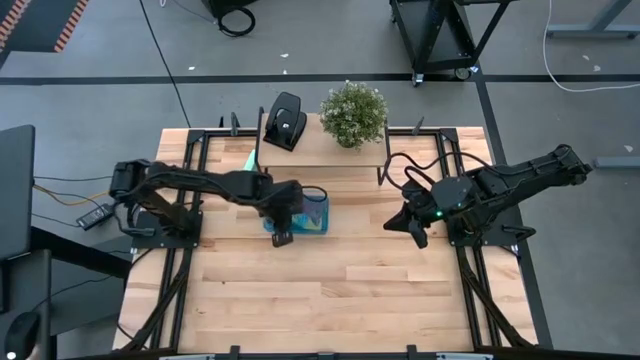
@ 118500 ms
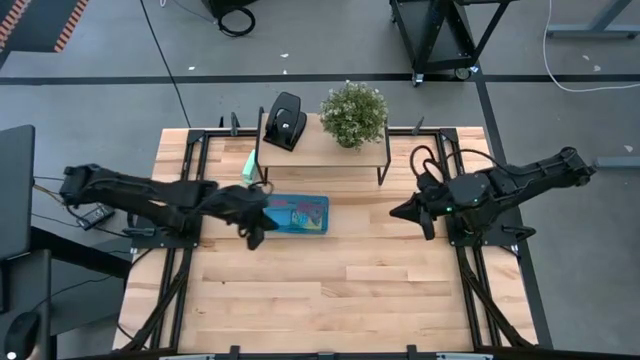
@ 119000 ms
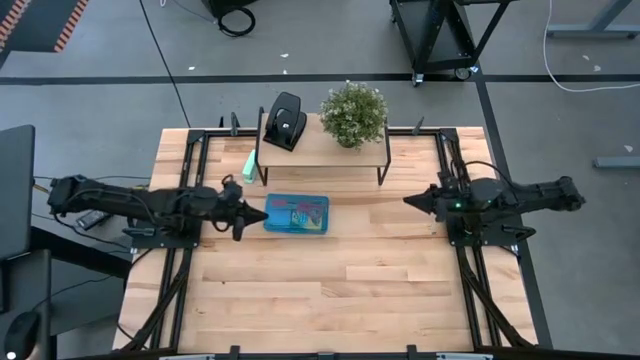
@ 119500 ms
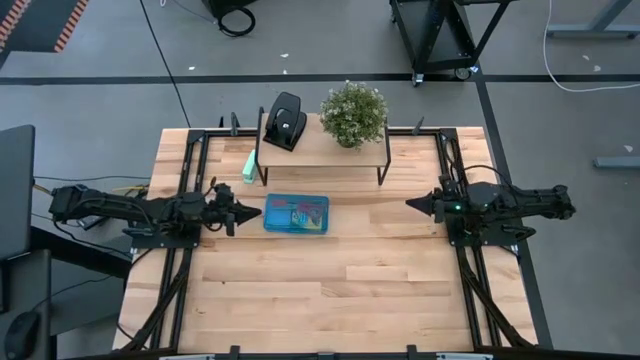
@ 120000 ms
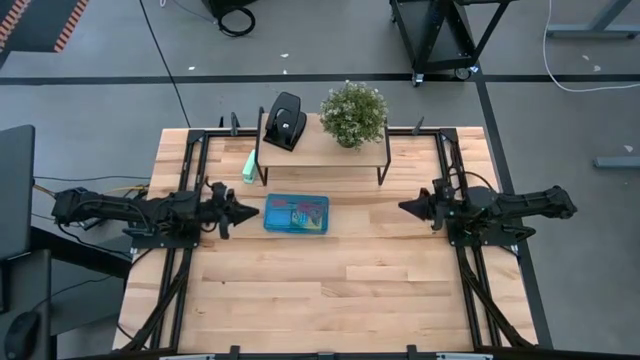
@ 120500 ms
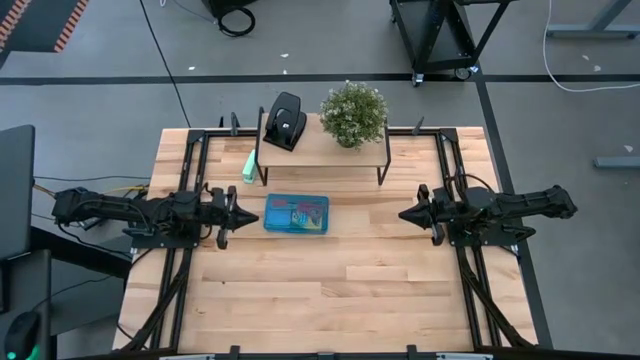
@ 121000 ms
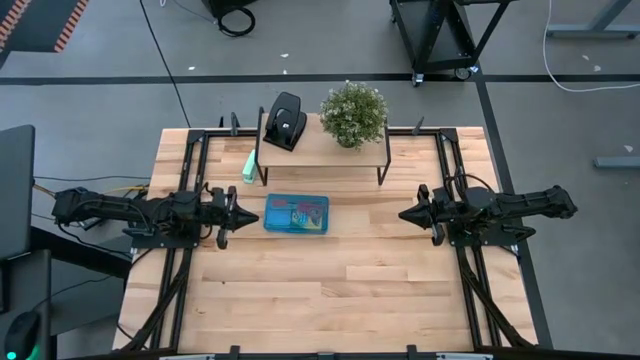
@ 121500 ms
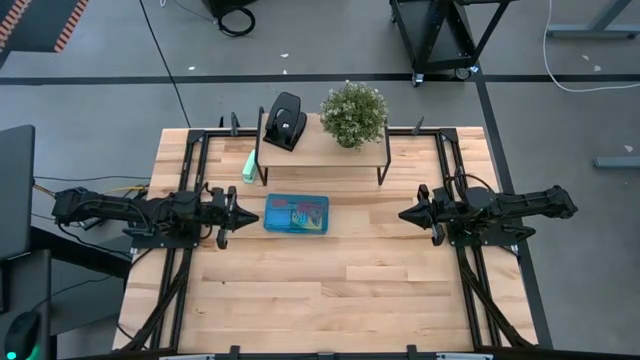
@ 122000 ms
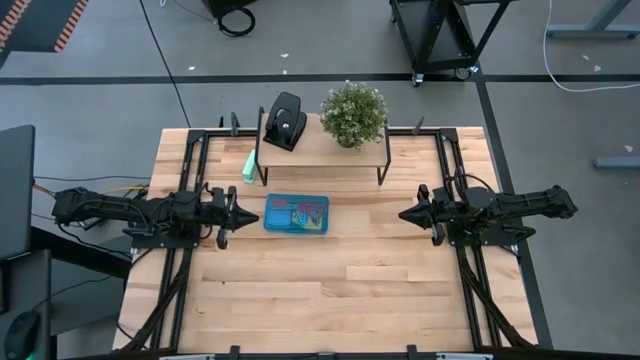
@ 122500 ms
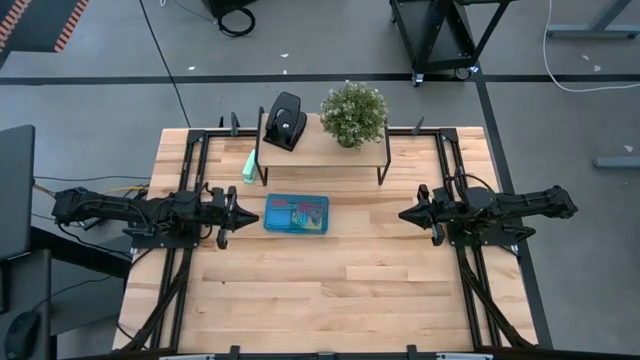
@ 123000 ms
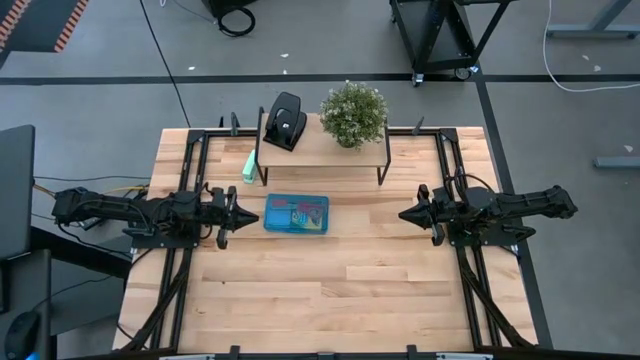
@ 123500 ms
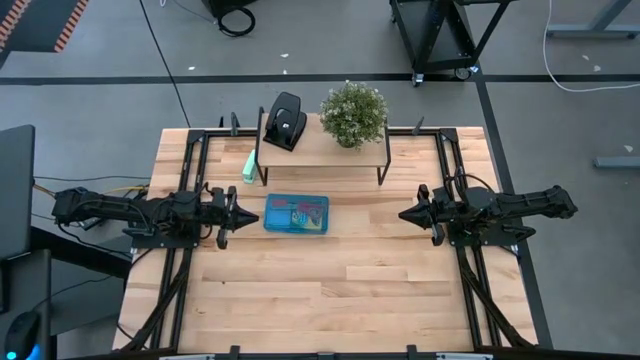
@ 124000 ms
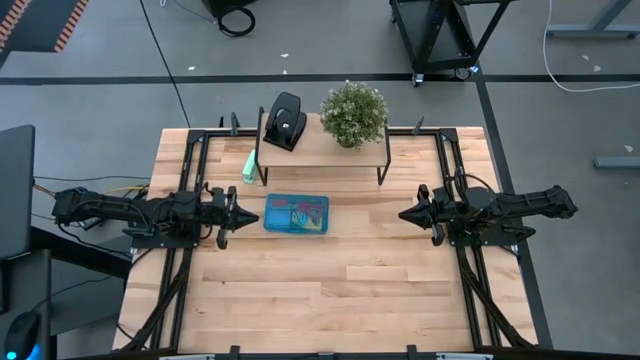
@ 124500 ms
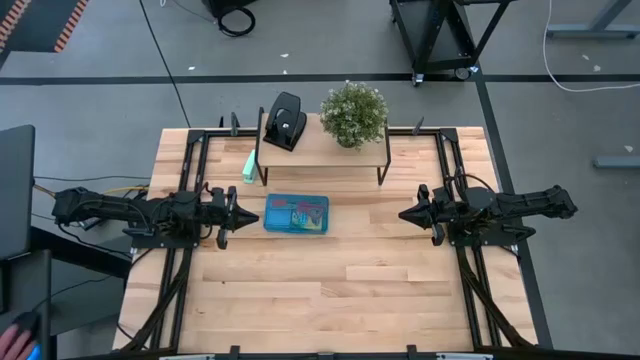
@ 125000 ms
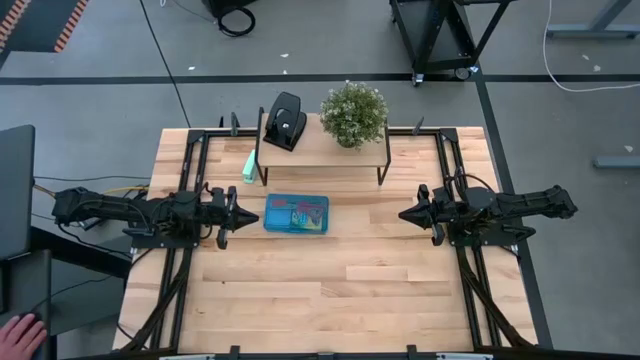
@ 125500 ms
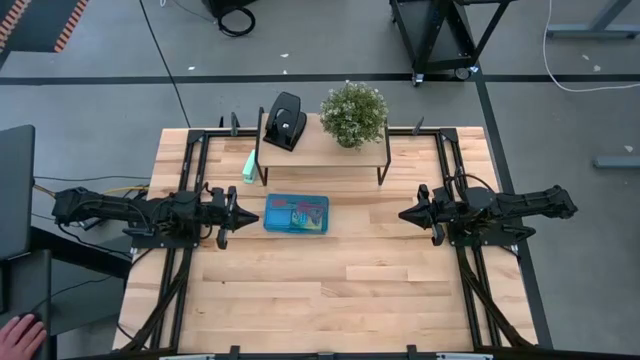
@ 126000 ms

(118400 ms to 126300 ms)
Task: Pack school essentials
Return to Home Position

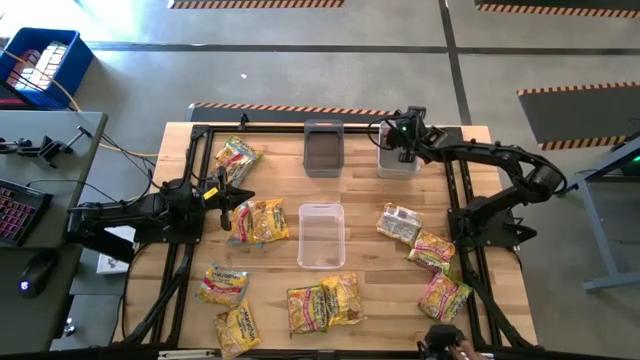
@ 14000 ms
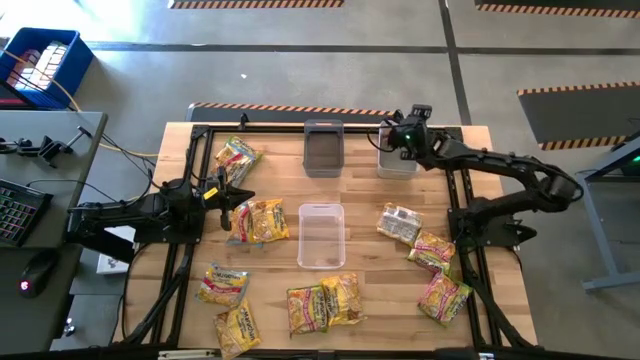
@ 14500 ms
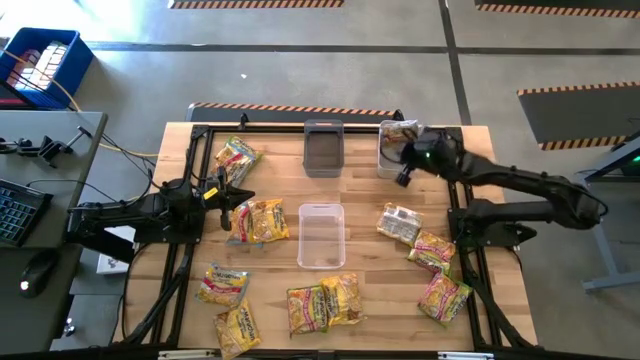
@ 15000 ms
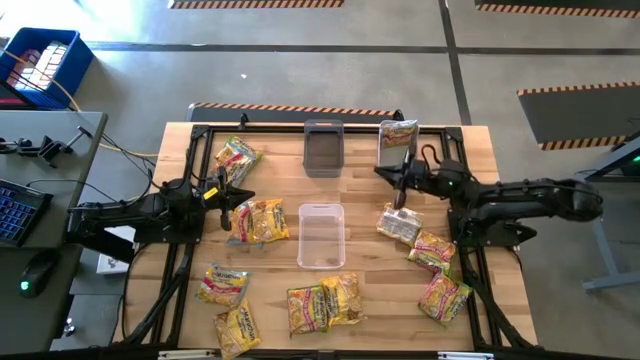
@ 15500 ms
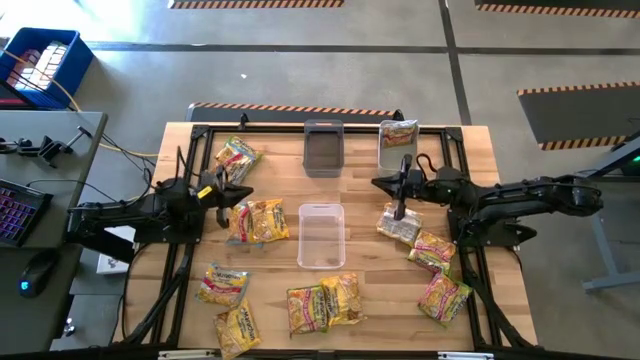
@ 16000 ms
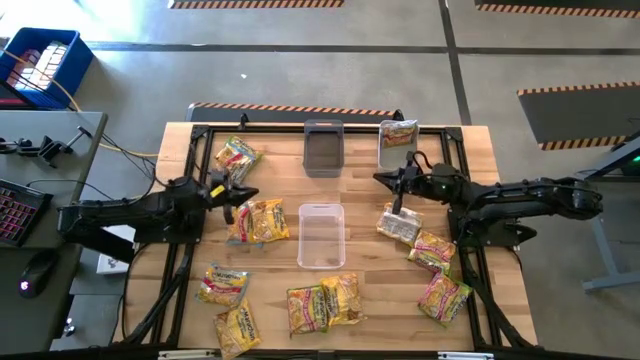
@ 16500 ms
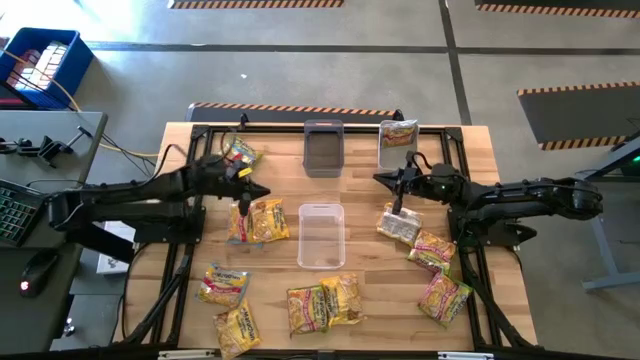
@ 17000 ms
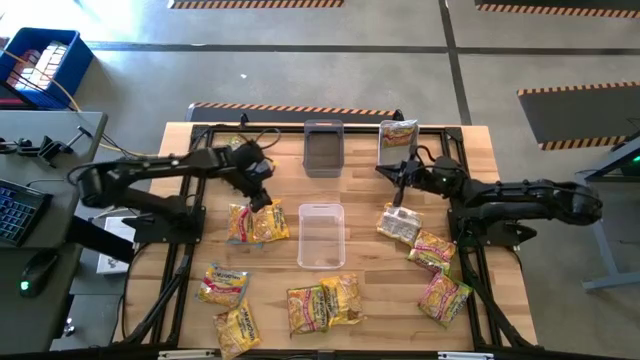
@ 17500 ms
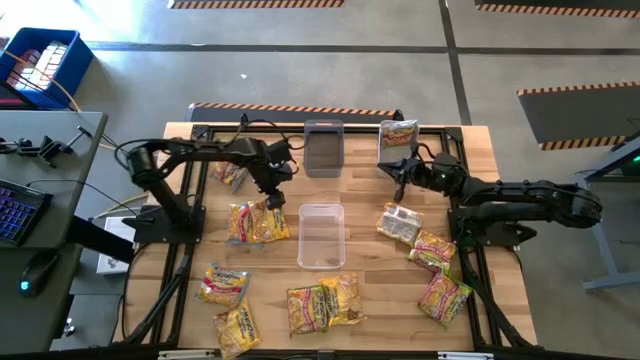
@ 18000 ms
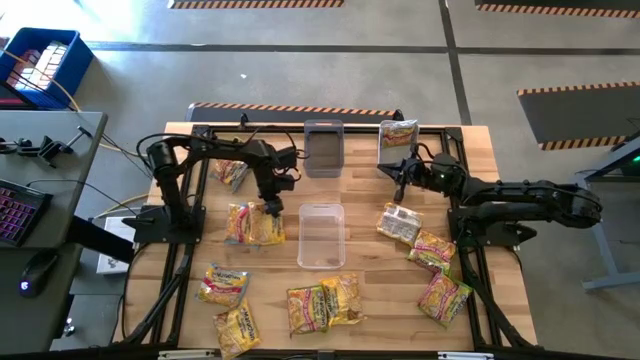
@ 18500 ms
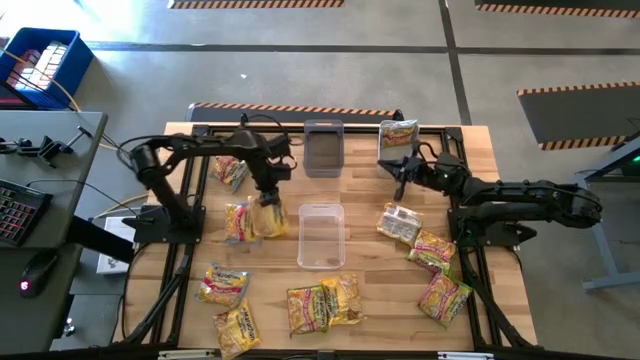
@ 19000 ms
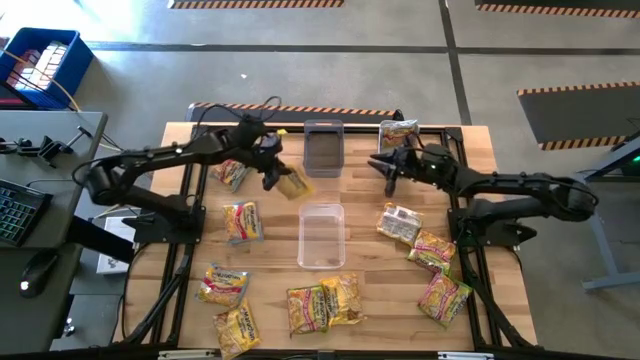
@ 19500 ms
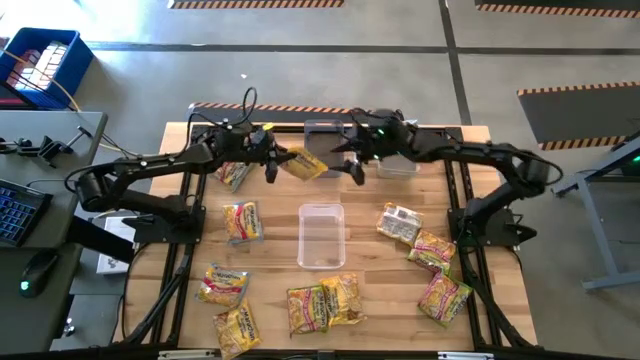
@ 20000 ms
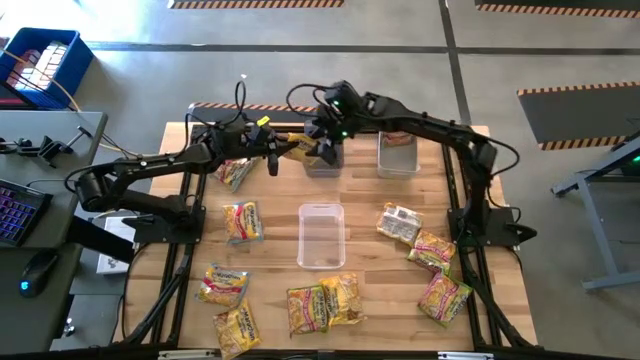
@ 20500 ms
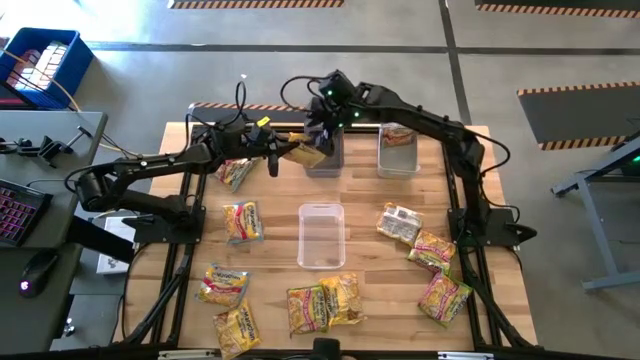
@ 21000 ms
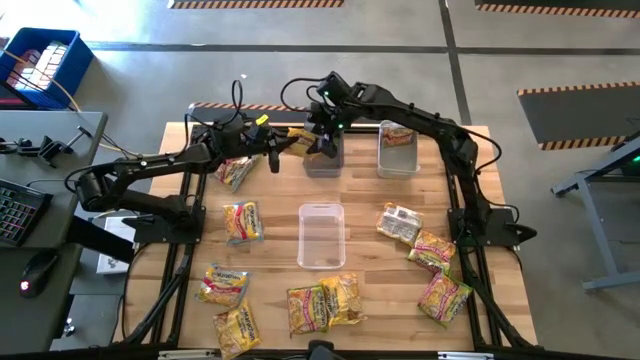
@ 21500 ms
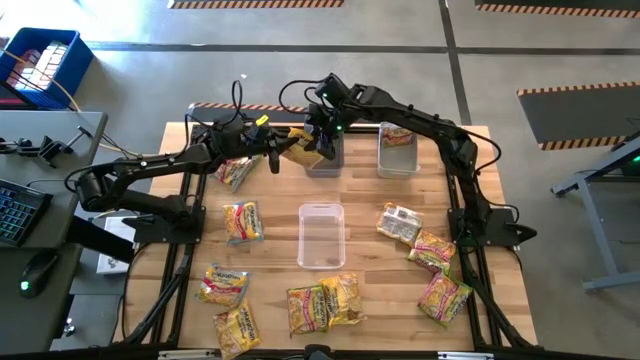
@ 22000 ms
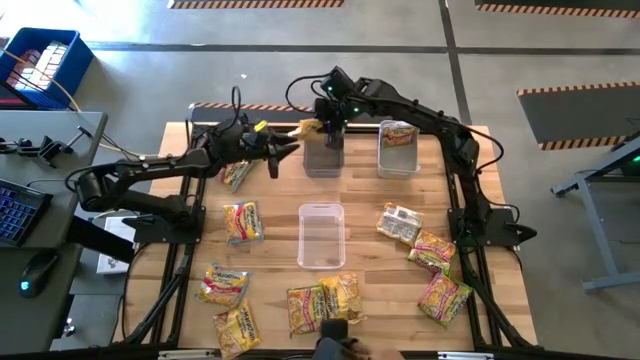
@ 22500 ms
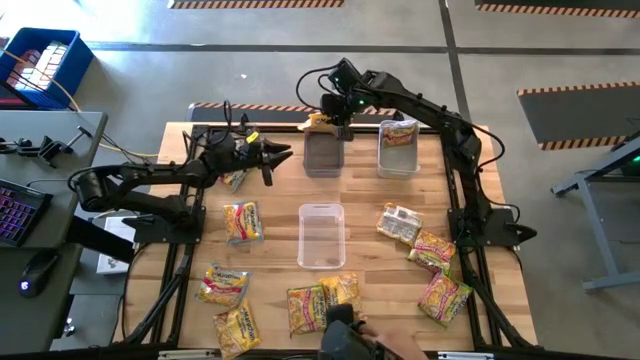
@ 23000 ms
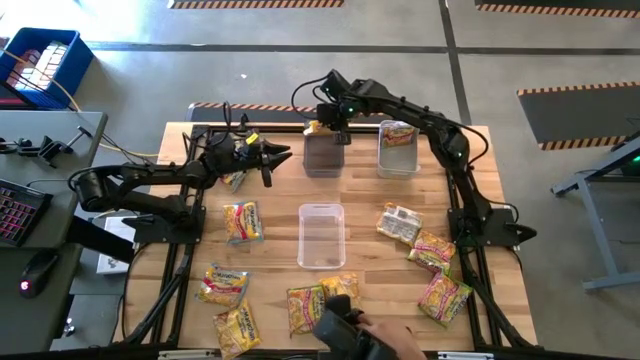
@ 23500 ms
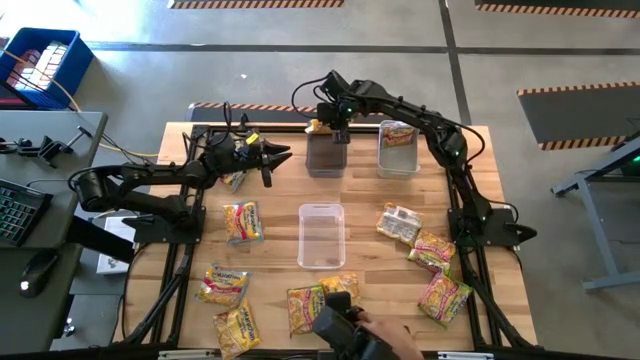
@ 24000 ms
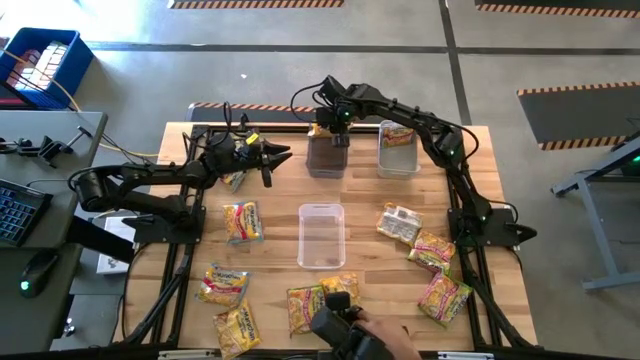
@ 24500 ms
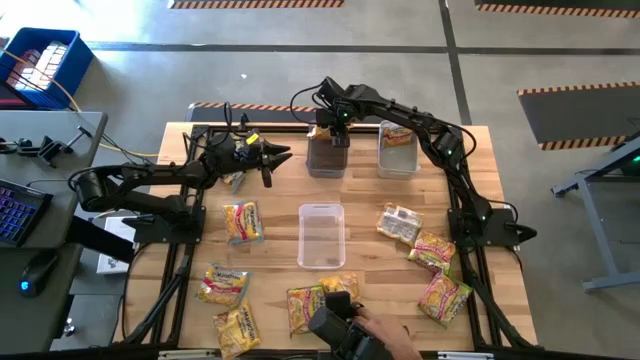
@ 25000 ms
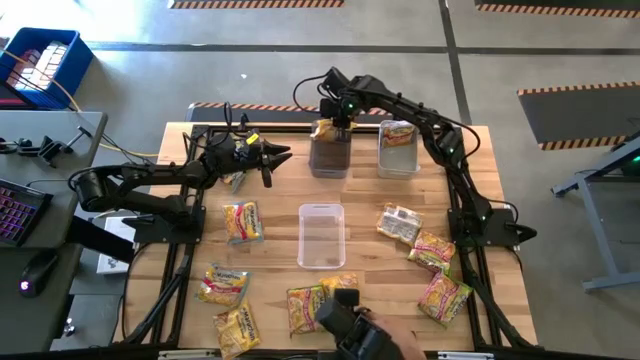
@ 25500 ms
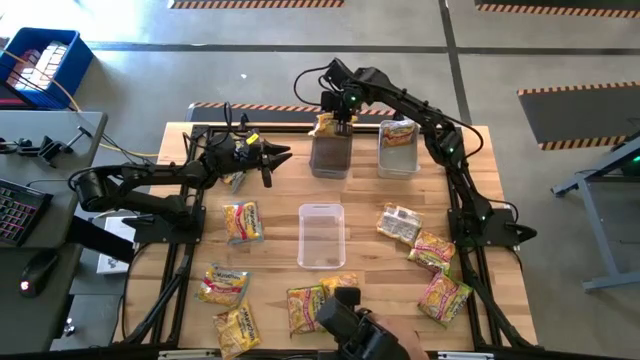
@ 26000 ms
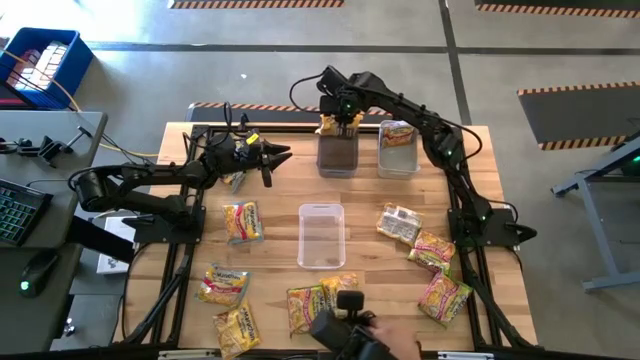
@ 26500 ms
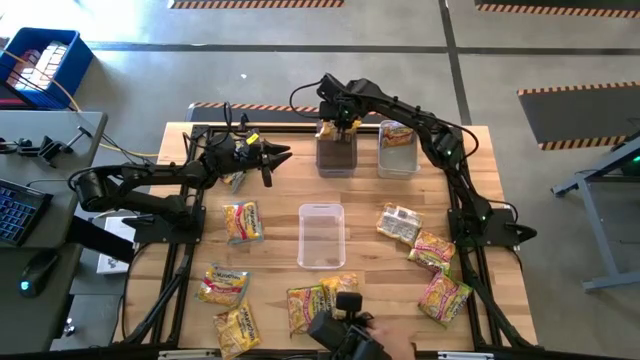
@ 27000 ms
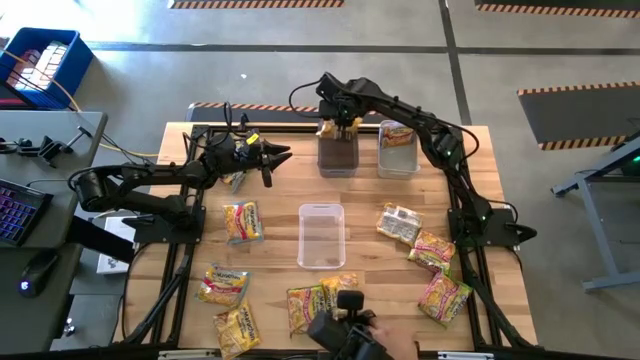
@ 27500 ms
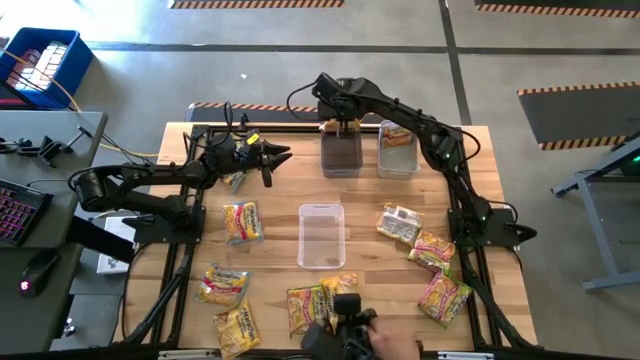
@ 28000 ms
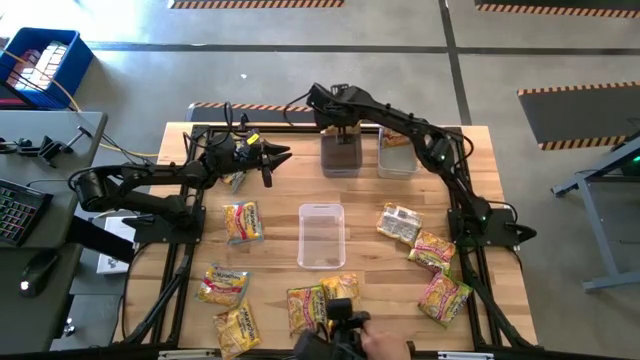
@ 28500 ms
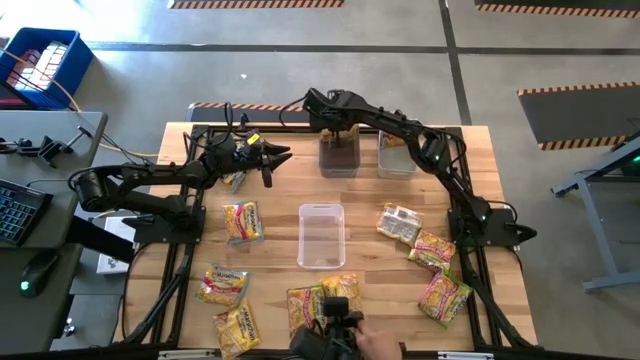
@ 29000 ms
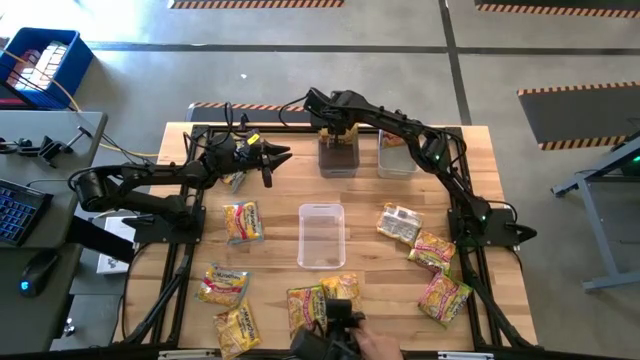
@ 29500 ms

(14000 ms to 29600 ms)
Task: Sort Maruchan noodles
Put the yellow noodle pack into the black bin
